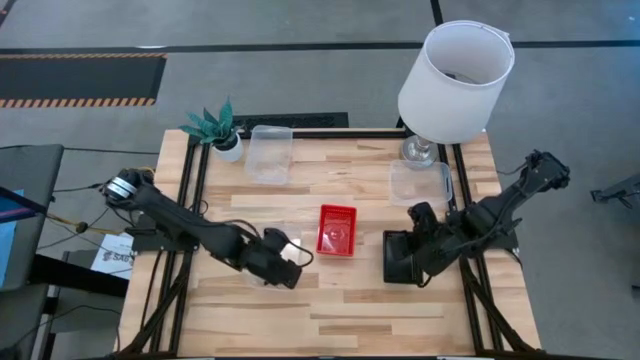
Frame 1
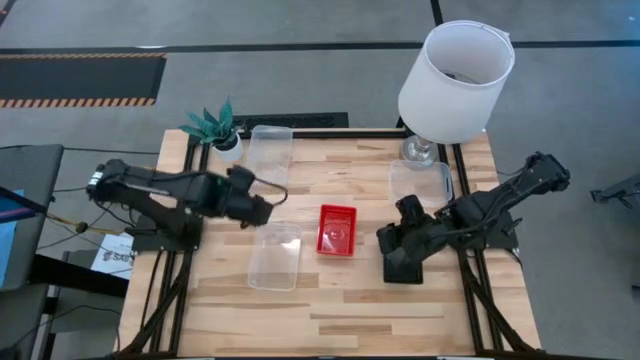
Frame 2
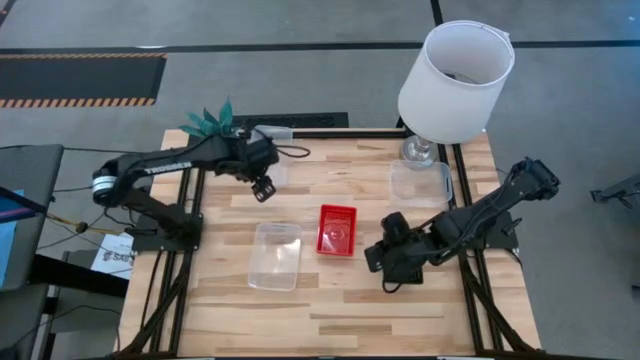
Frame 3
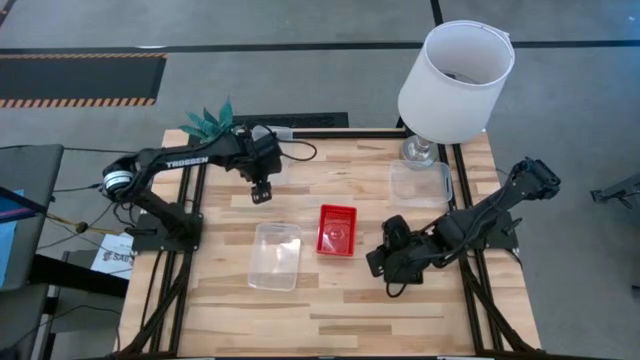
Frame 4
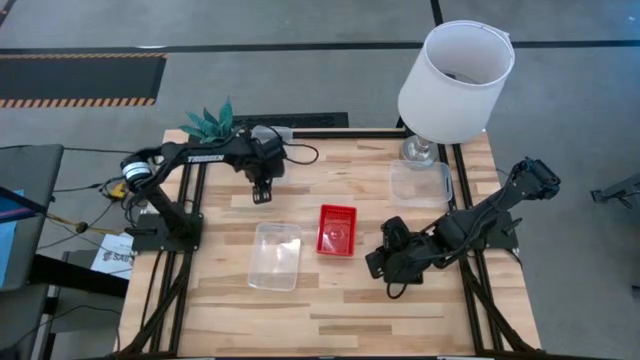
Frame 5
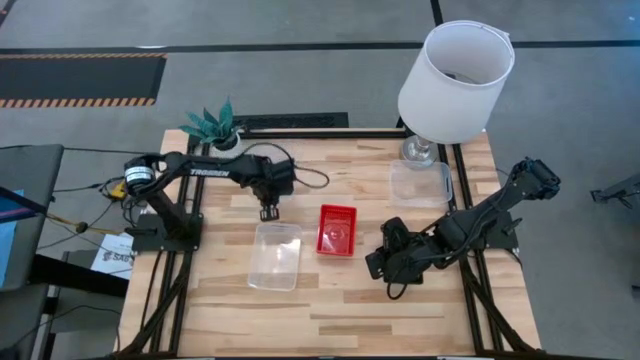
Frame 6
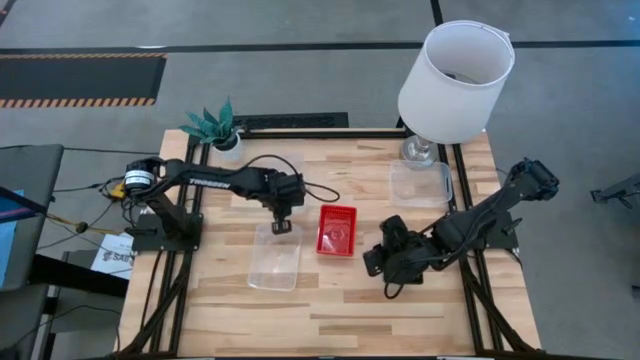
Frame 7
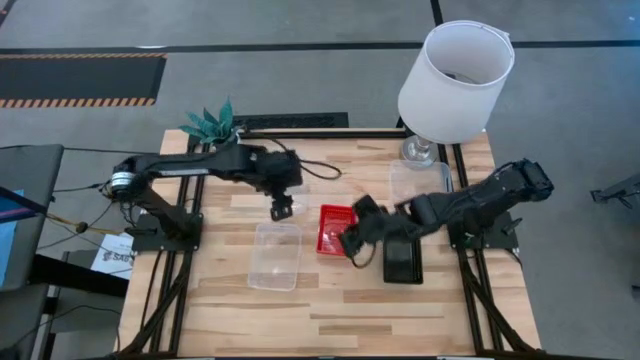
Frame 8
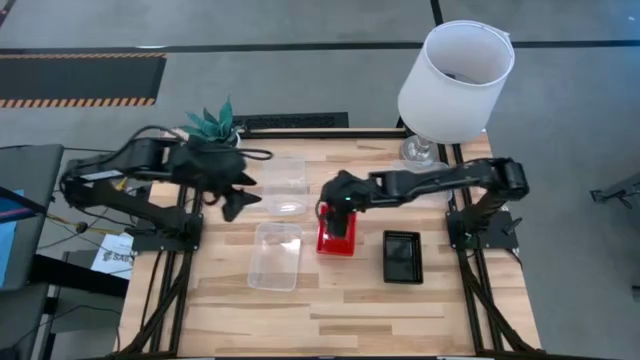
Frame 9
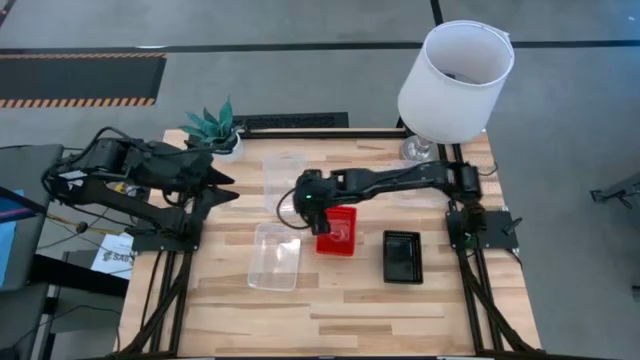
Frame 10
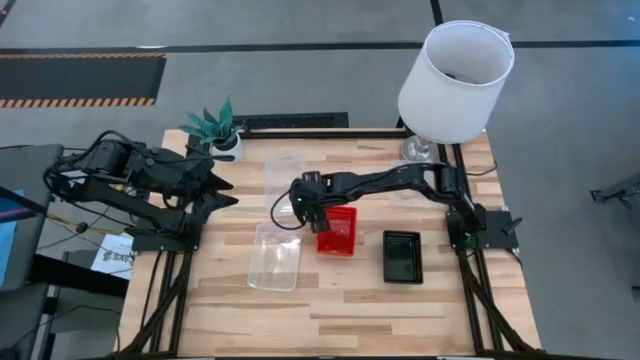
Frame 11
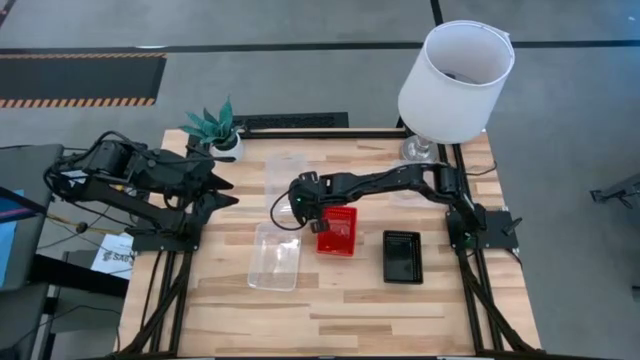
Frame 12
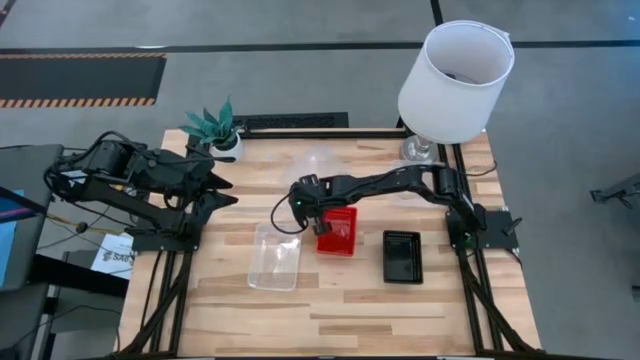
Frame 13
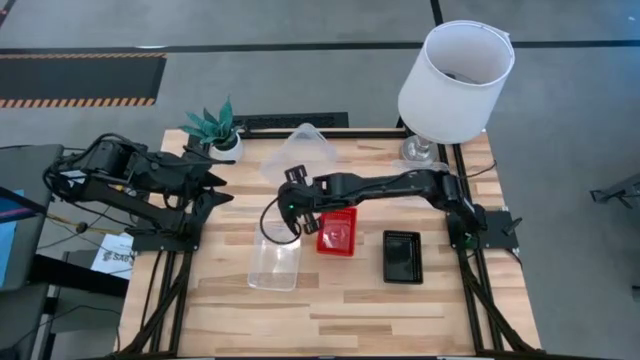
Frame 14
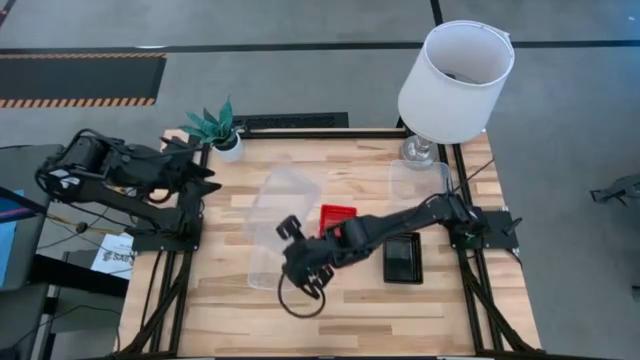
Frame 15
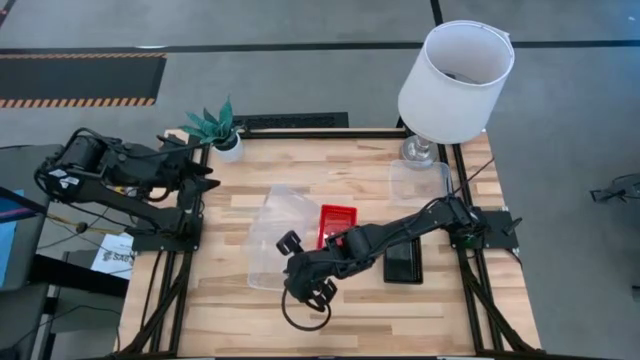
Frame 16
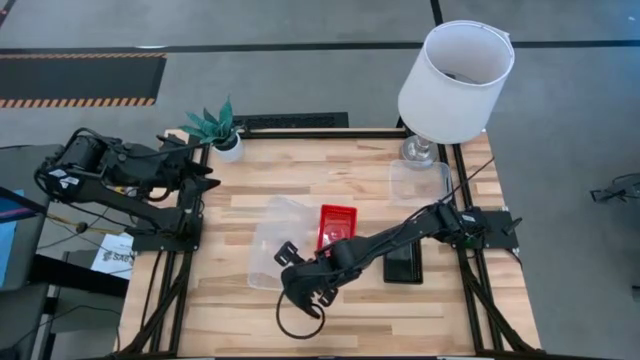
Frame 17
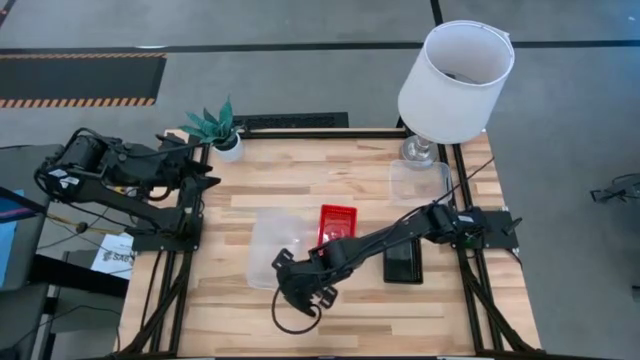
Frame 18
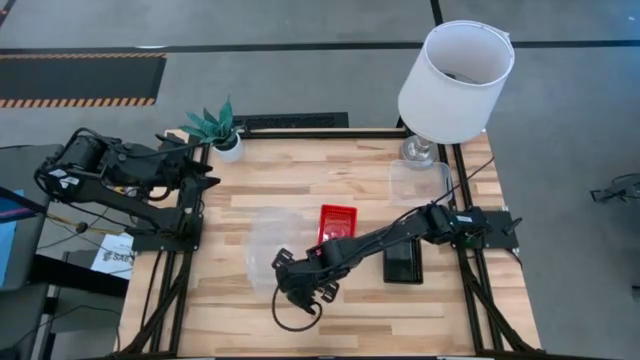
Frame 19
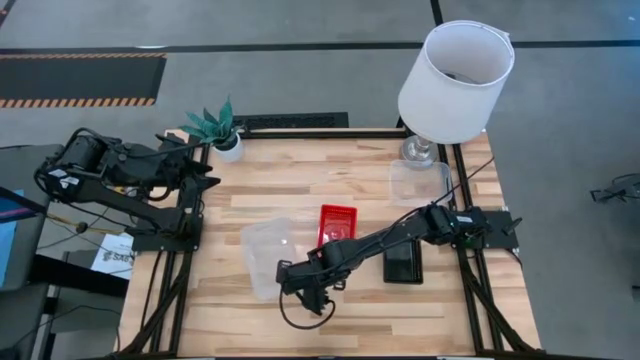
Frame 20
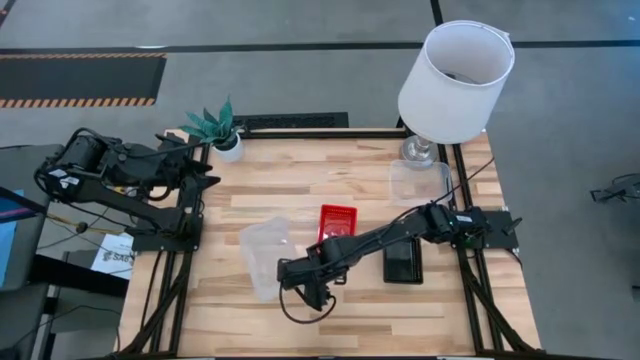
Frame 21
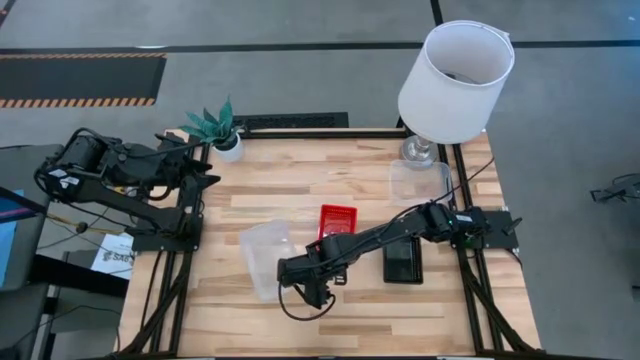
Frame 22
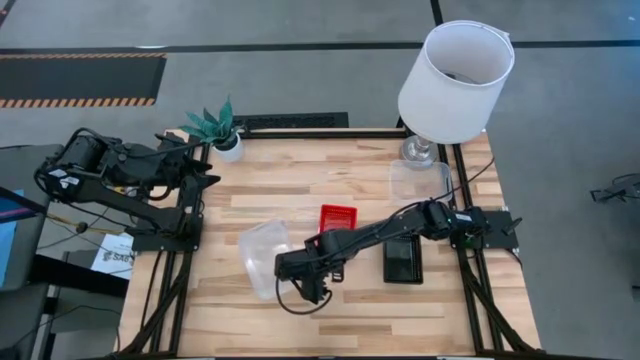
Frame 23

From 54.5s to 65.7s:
Stack the top transparent bin on top of the bottom transparent bin

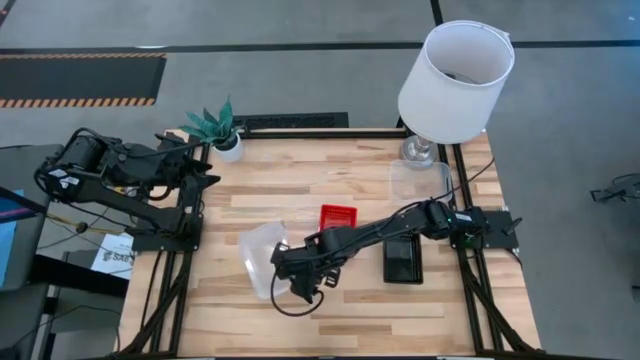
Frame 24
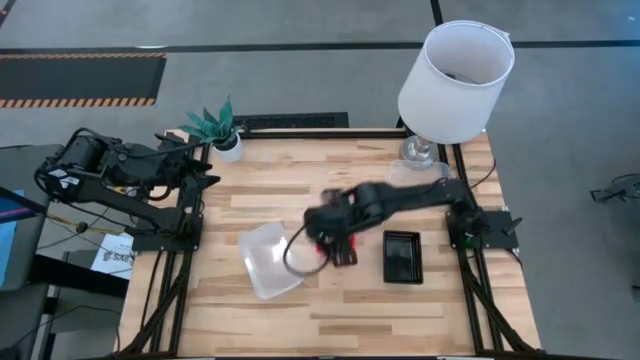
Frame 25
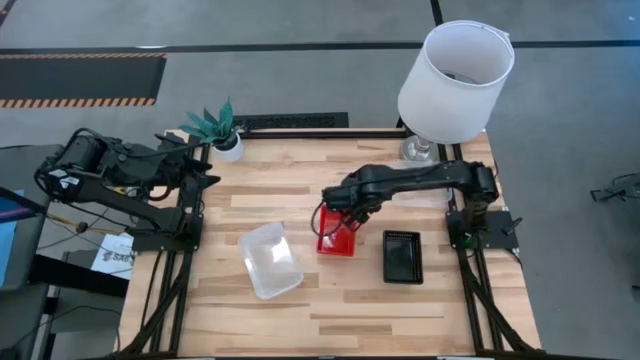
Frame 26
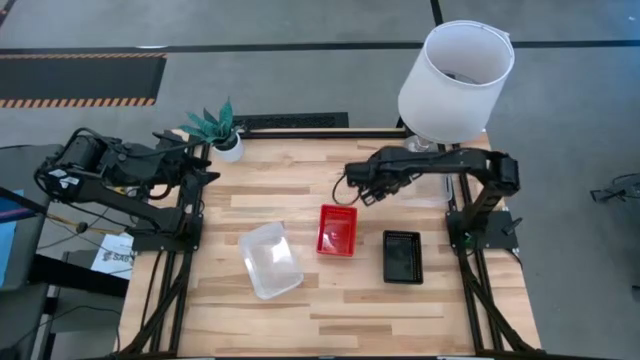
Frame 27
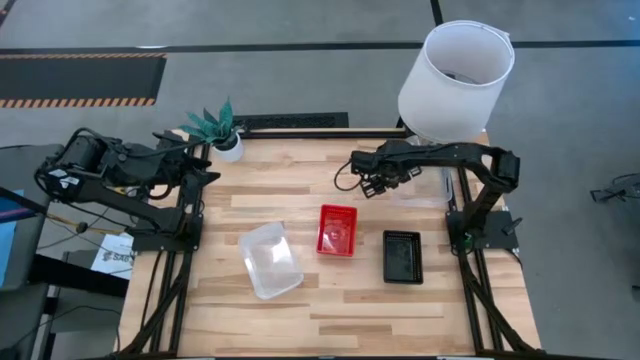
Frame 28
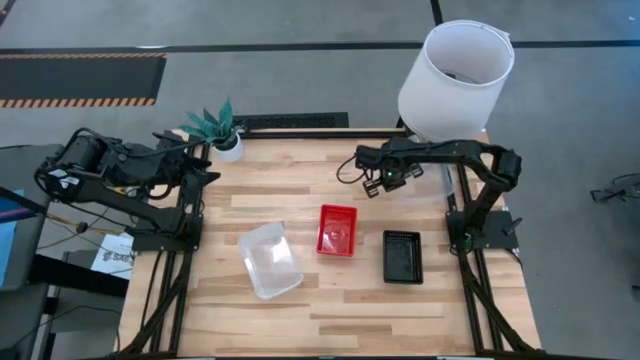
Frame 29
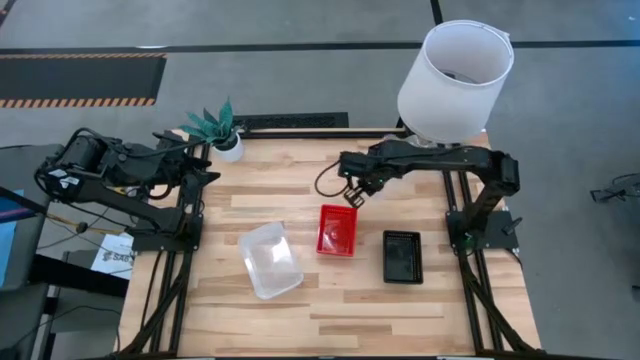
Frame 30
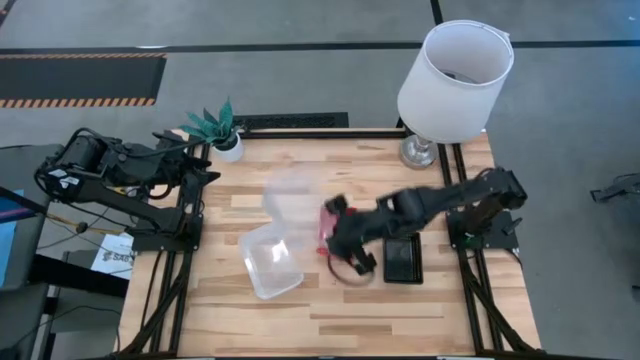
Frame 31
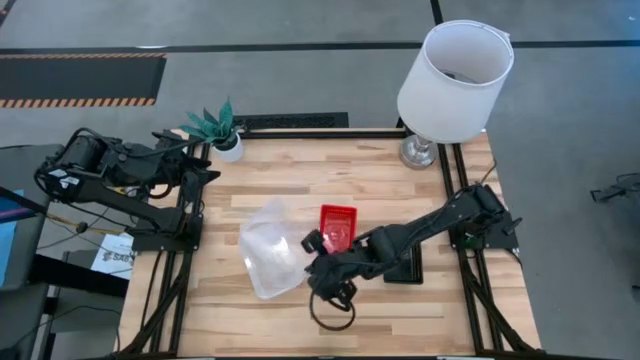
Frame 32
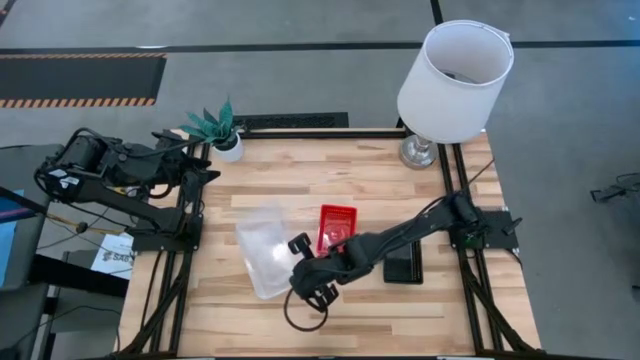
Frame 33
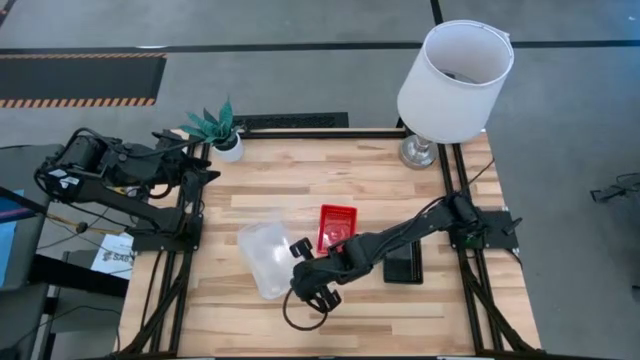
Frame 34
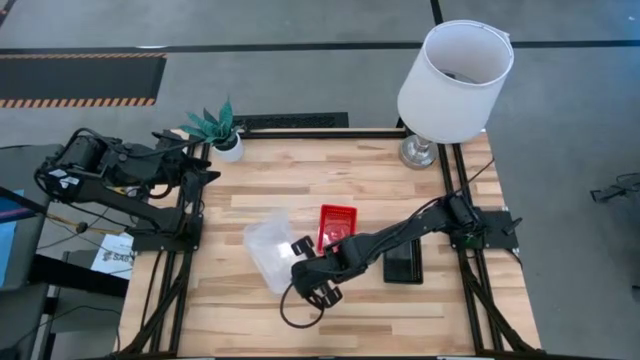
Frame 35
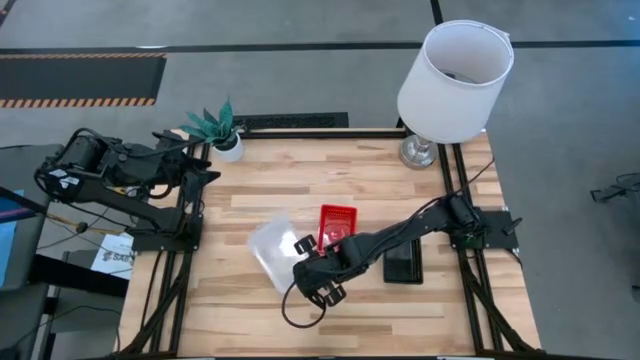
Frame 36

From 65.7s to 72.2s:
Stack the top transparent bin on top of the transparent bin

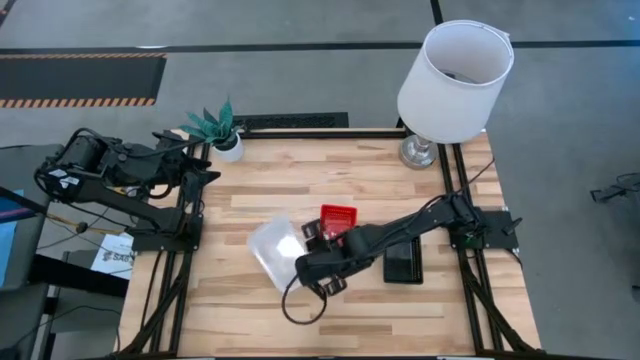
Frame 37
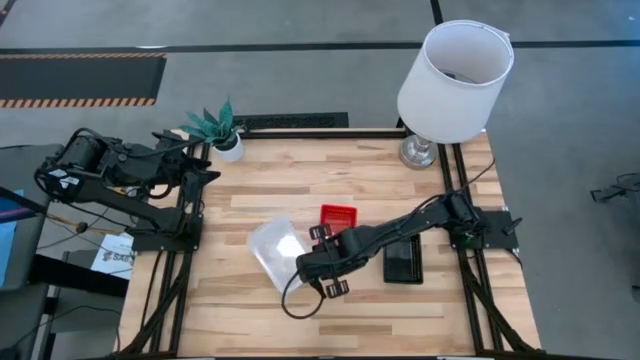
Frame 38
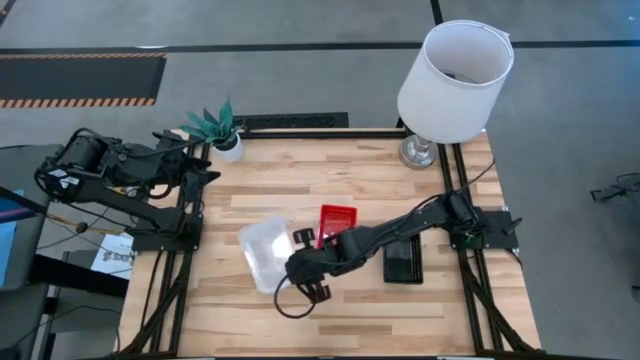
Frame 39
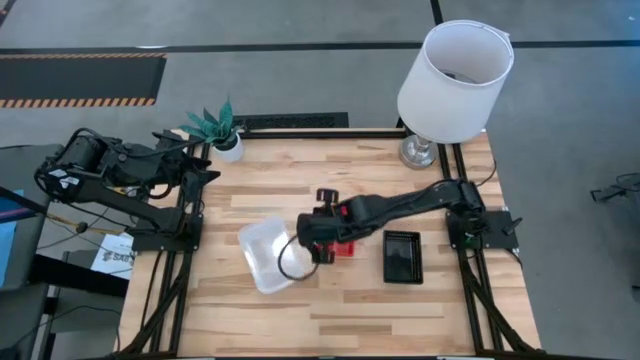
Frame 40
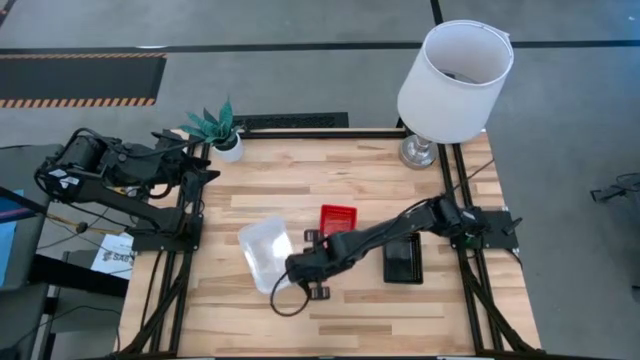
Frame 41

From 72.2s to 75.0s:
Adjust the stack of white bins

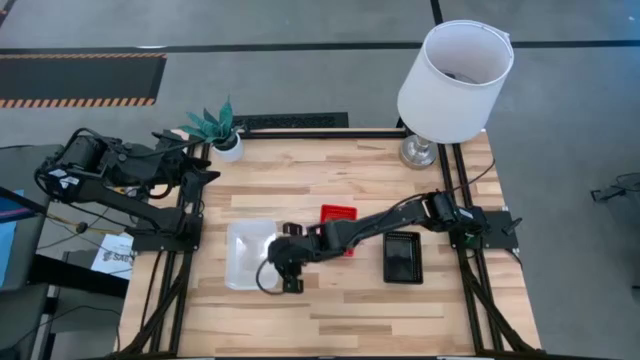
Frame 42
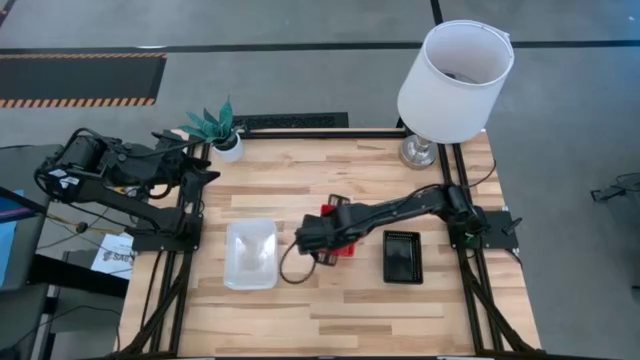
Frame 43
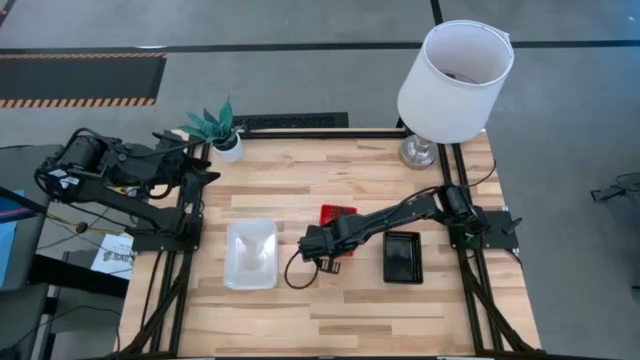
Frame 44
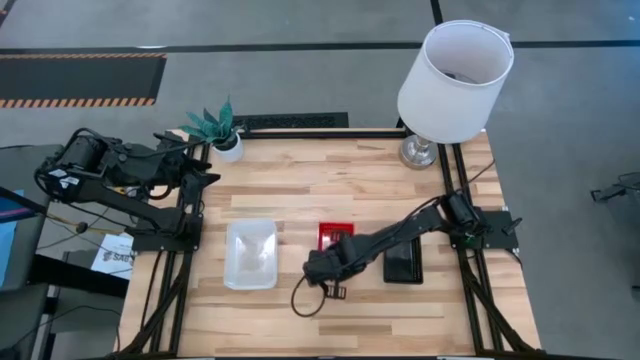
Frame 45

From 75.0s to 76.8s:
Adjust the stack of red bins
